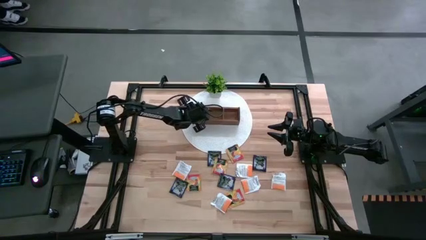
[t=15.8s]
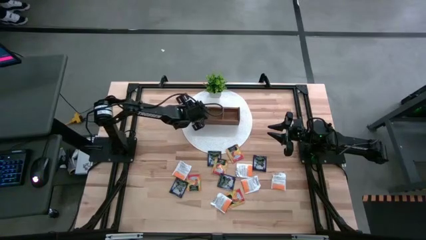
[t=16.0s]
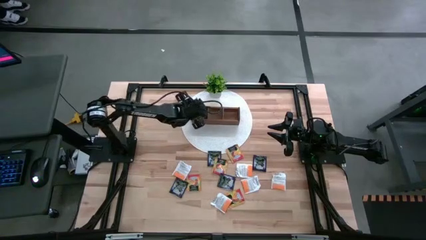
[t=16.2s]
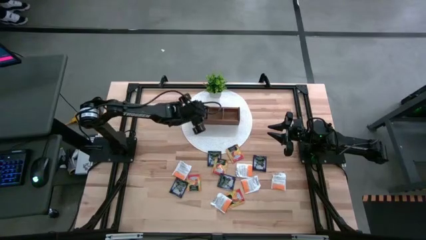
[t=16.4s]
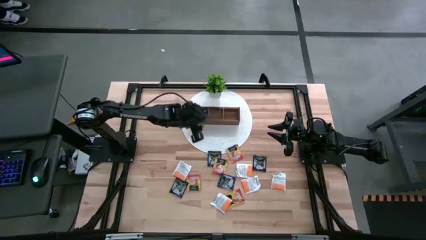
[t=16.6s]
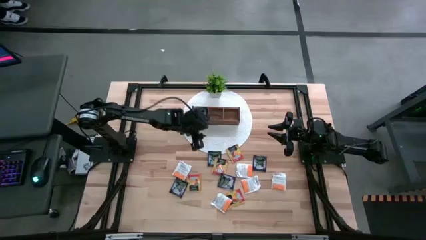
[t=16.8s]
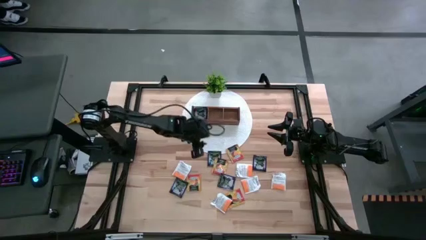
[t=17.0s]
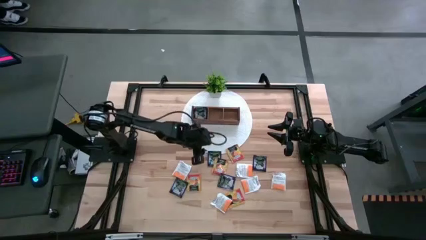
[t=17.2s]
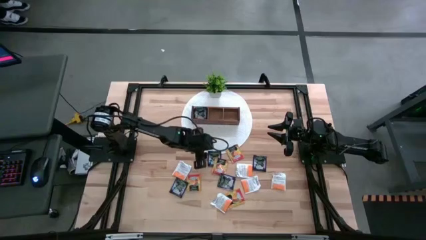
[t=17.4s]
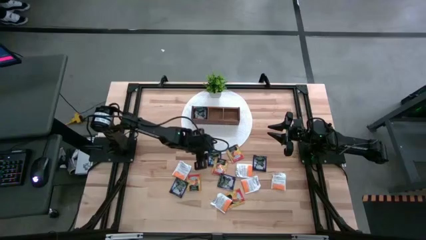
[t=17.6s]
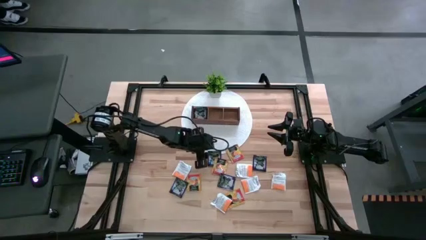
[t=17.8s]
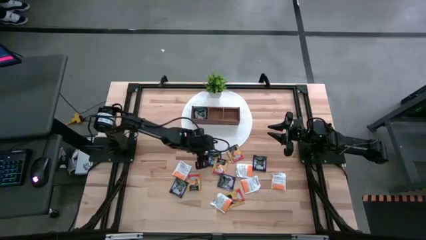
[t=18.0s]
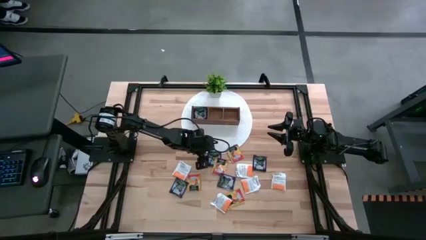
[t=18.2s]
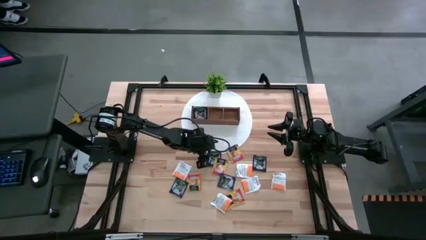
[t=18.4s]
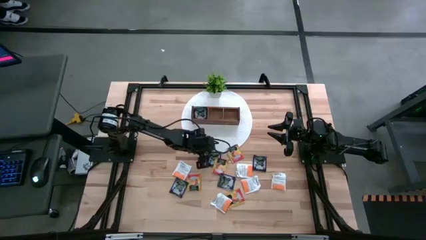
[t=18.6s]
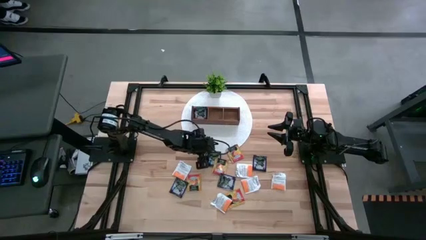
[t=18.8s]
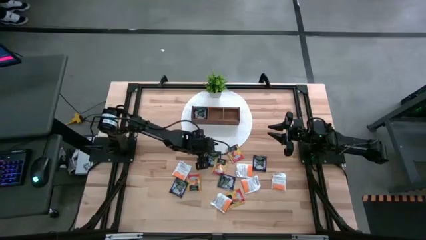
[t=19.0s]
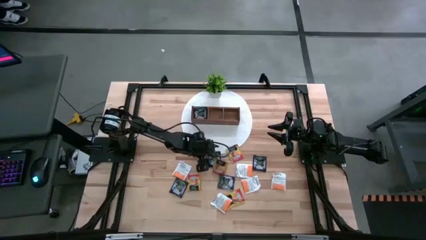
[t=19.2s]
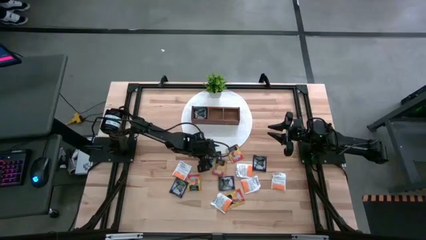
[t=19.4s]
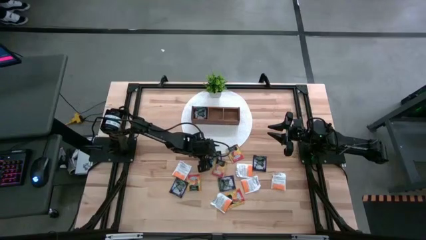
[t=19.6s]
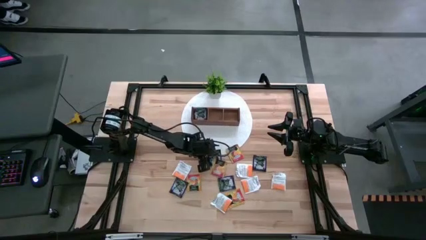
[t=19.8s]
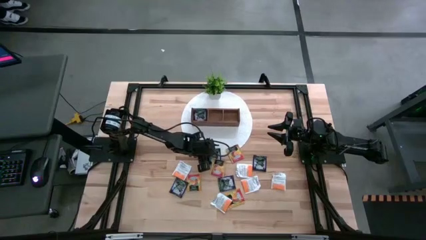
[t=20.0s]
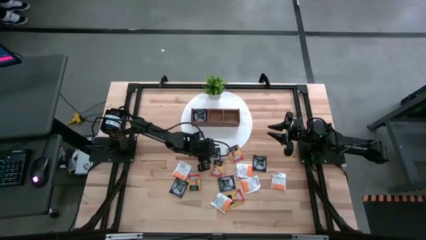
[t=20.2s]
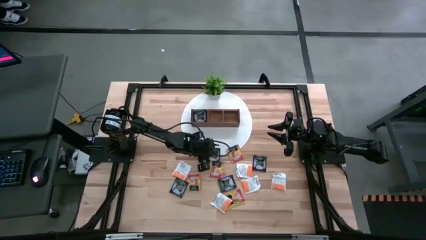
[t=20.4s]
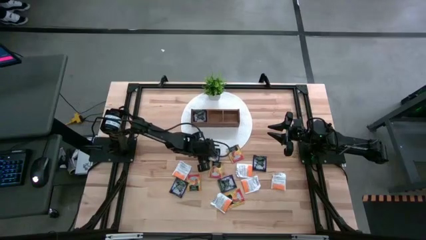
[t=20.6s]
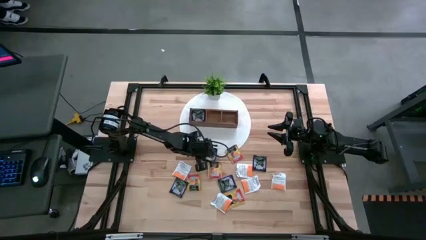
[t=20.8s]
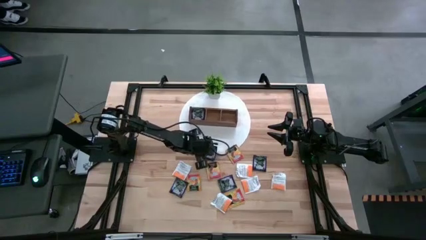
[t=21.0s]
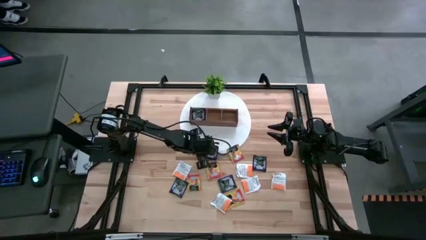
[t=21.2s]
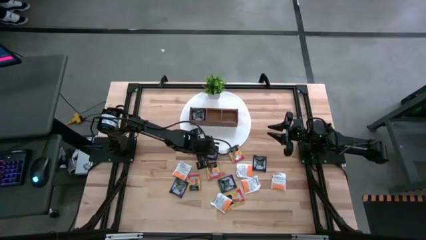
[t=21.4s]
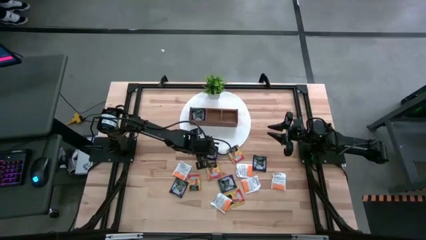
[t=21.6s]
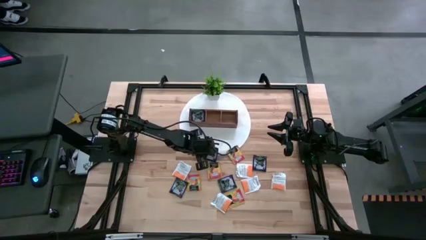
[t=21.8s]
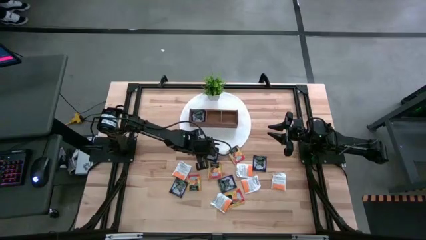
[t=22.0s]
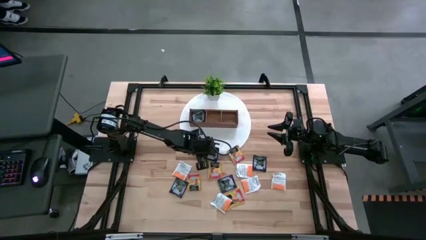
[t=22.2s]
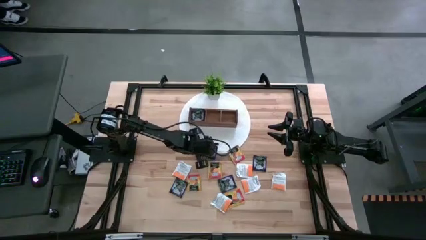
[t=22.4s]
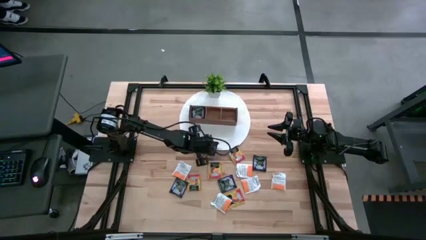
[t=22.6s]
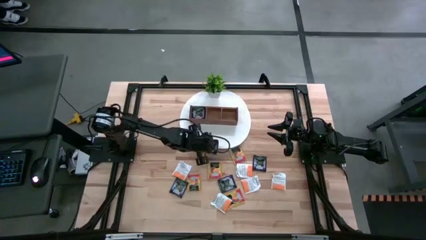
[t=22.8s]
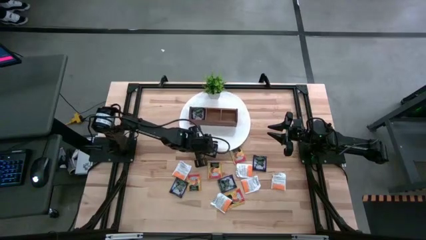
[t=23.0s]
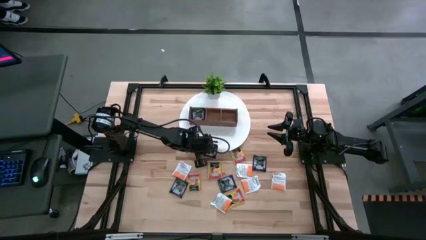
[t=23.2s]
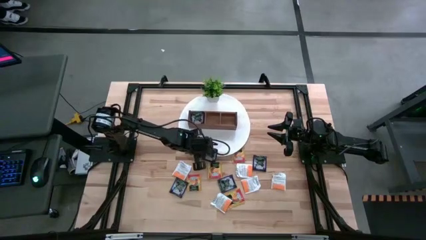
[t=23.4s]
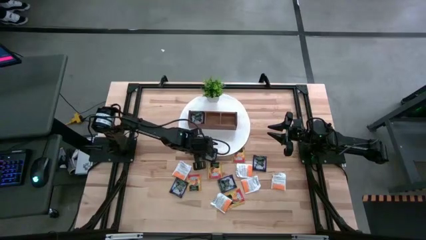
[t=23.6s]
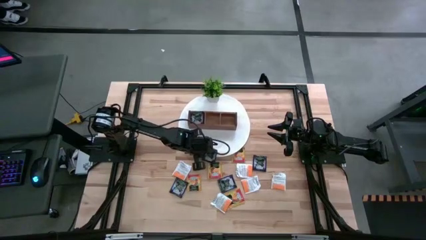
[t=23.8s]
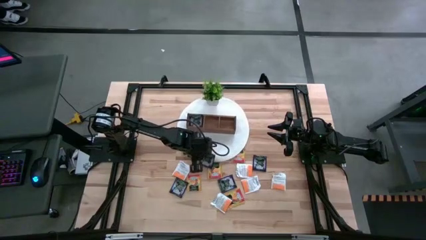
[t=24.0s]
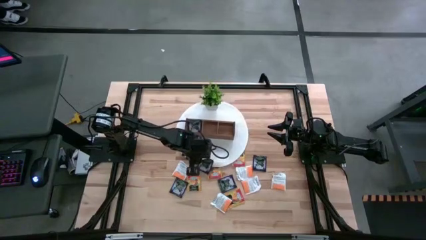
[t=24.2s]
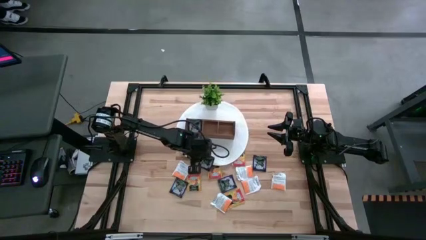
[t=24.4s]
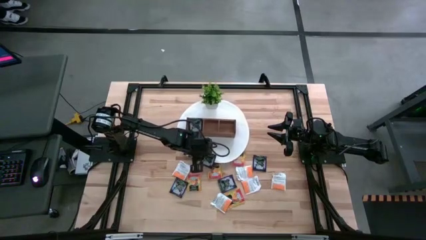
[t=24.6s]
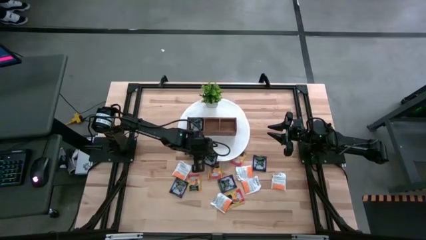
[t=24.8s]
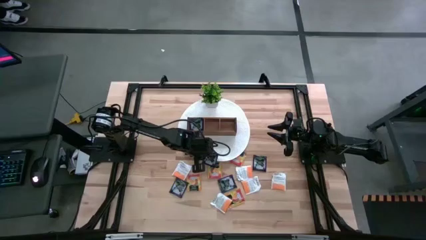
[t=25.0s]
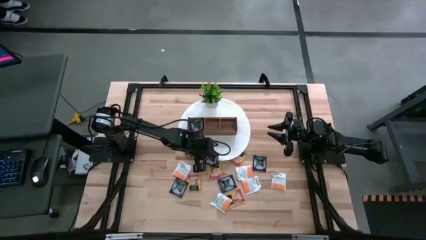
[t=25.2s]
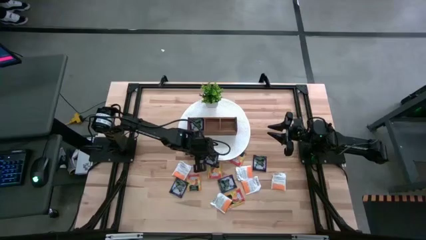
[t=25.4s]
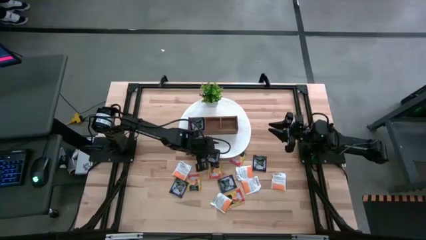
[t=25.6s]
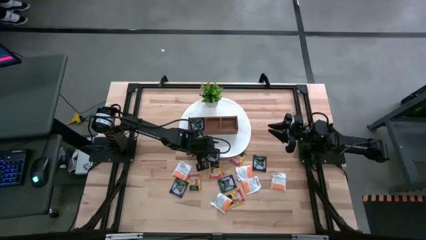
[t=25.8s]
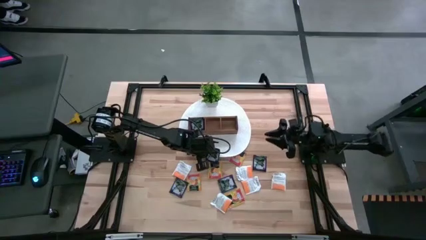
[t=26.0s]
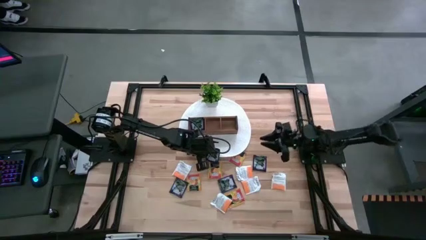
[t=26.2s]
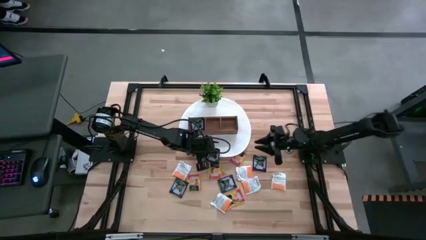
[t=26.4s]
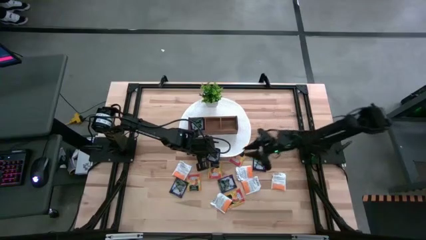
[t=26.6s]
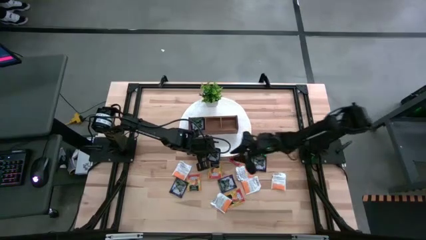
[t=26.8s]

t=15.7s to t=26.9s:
Task: Pick & Place Tea
Put the black tea bag into the left section of the wooden organizer

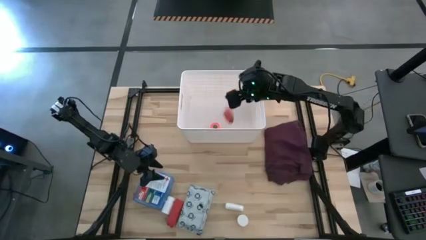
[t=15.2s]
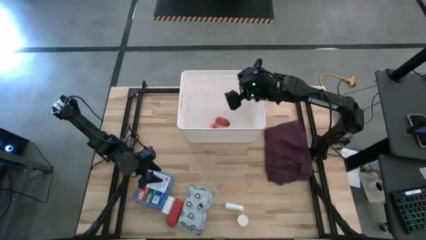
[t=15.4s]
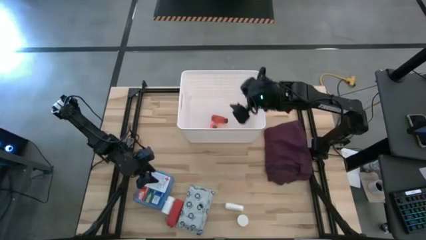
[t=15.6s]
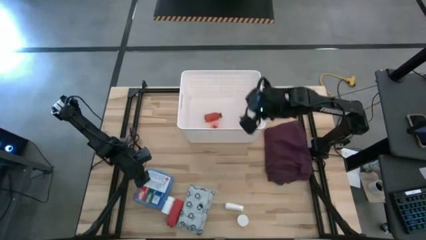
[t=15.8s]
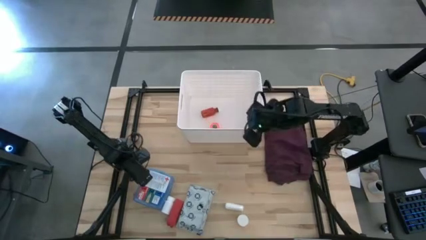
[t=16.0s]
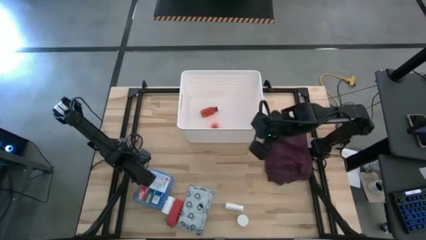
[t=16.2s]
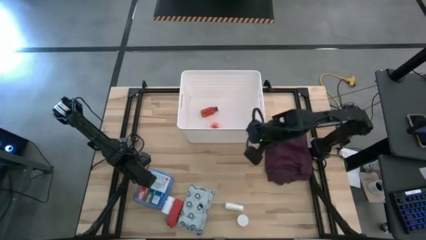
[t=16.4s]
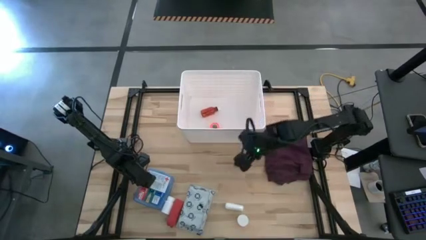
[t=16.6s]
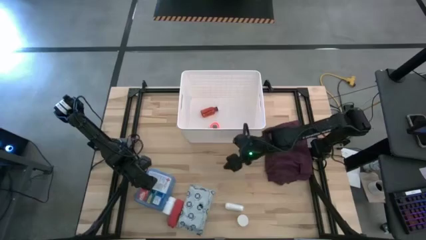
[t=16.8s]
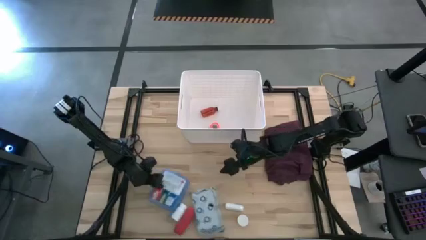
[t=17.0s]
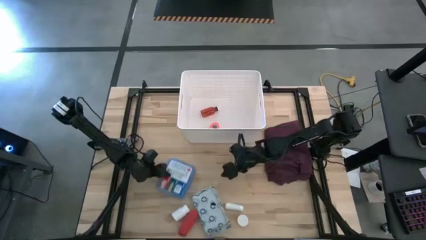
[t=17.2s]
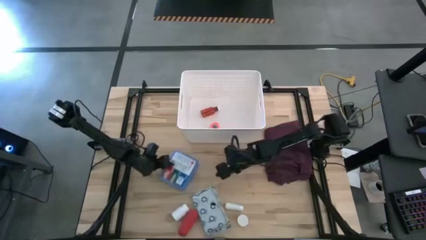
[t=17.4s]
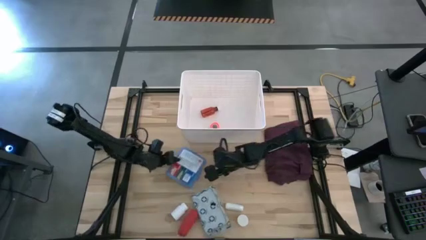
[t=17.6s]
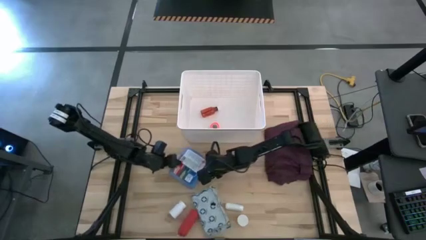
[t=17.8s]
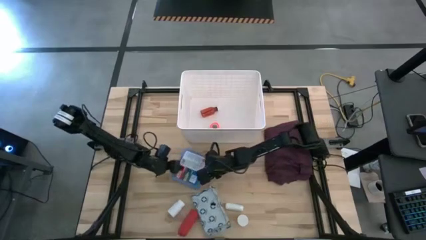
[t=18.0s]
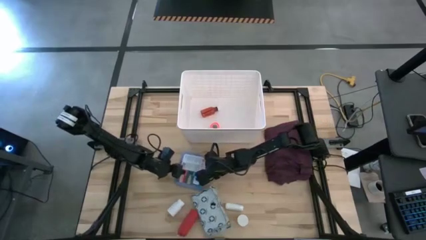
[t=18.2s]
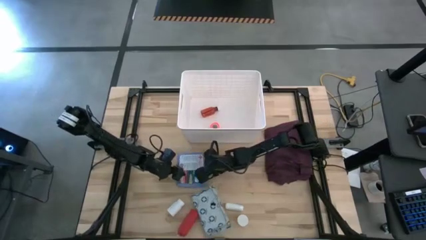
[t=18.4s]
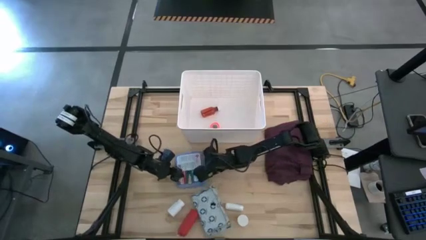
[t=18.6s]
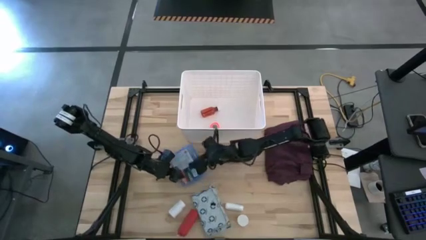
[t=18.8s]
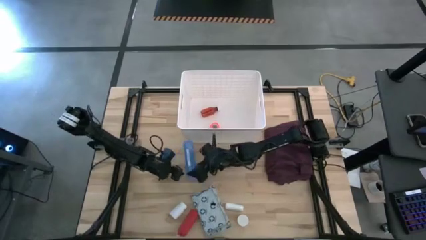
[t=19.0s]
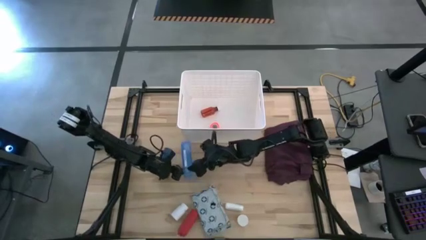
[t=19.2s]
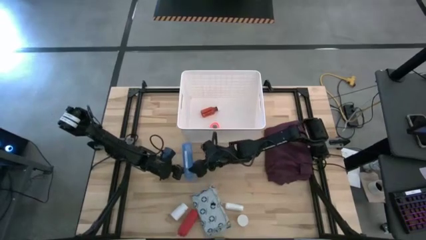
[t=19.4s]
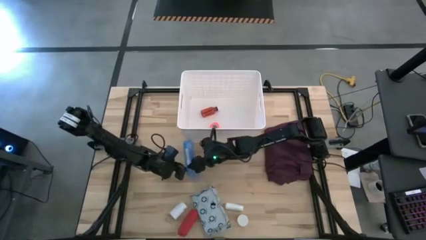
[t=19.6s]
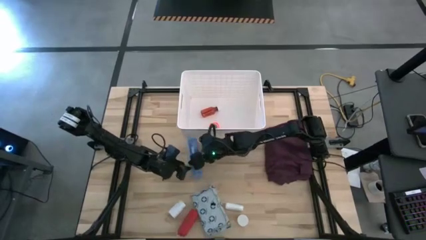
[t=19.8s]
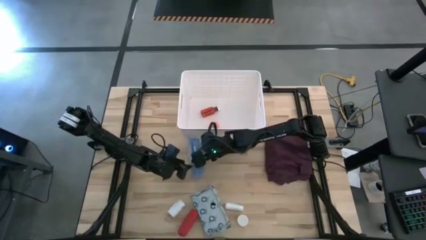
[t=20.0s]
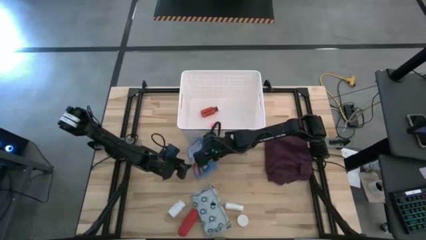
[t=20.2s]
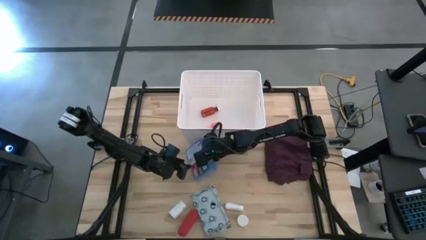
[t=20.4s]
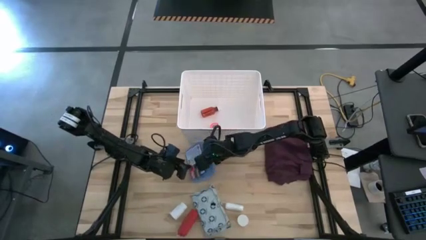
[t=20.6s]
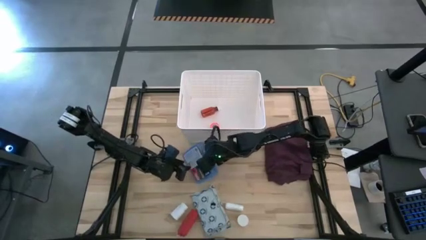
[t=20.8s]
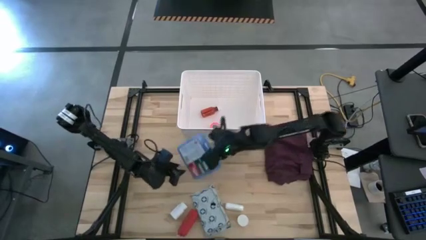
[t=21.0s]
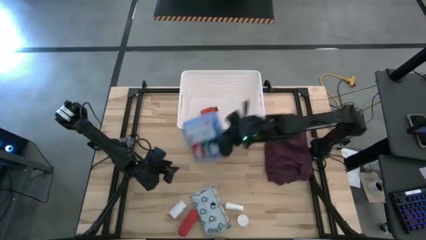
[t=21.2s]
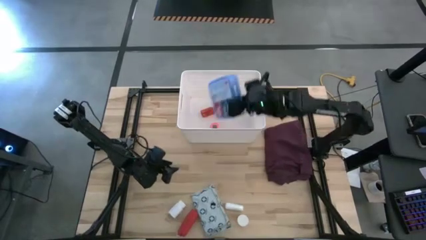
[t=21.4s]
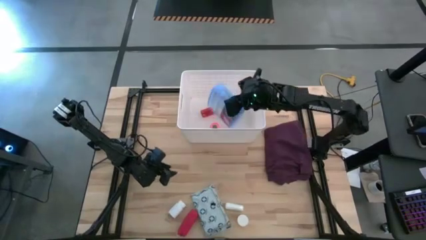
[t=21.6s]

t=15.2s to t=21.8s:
Task: Pick & place medical supplies in basket/bin
Put the first aid kit into the white bin
